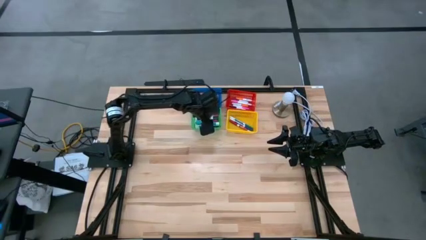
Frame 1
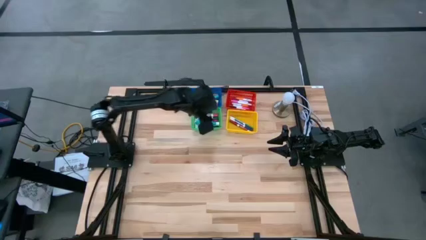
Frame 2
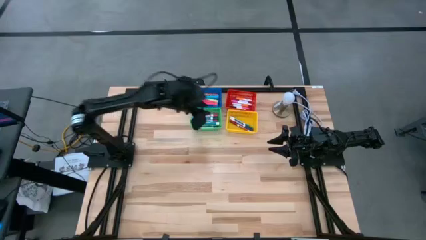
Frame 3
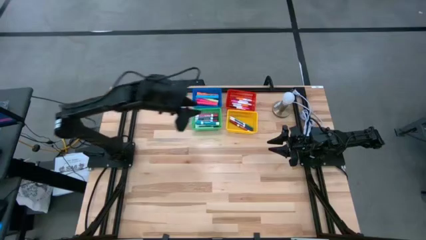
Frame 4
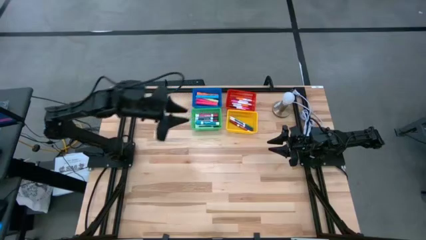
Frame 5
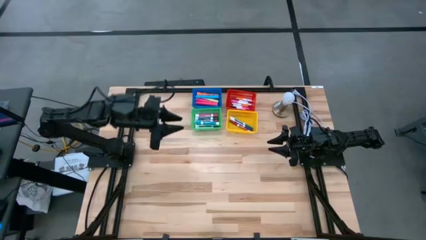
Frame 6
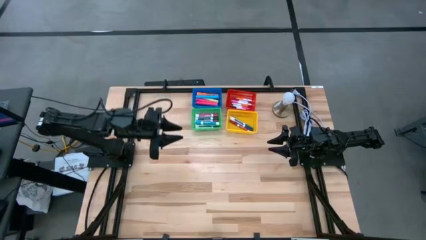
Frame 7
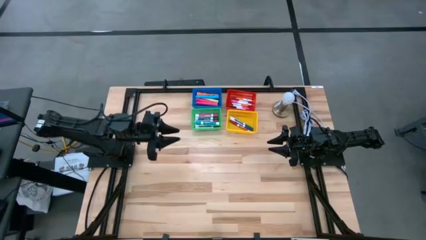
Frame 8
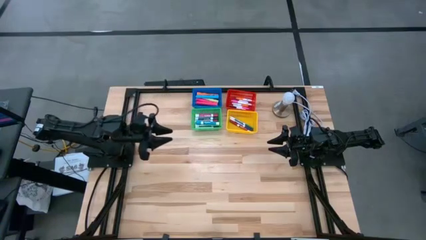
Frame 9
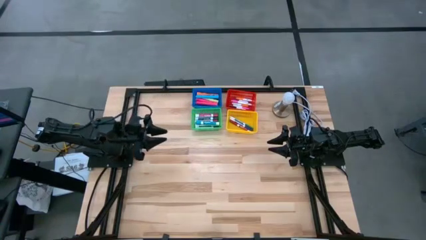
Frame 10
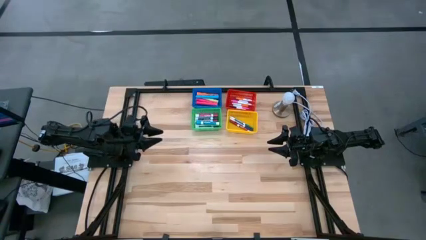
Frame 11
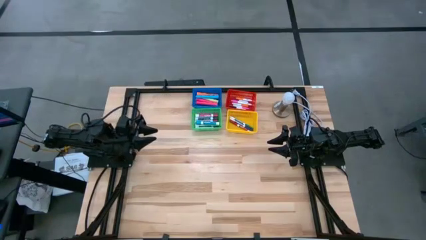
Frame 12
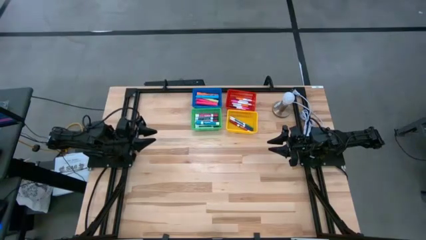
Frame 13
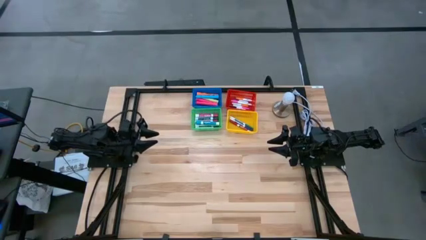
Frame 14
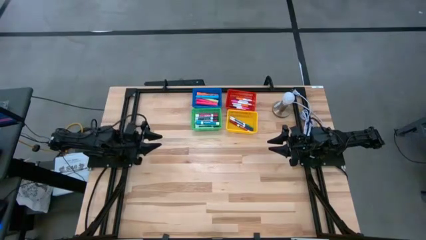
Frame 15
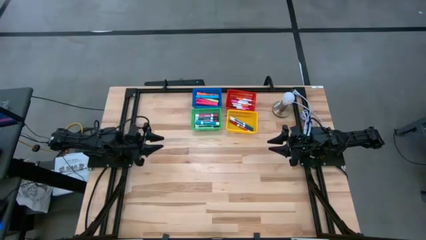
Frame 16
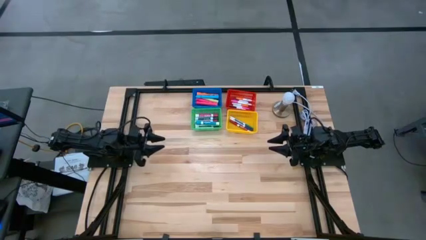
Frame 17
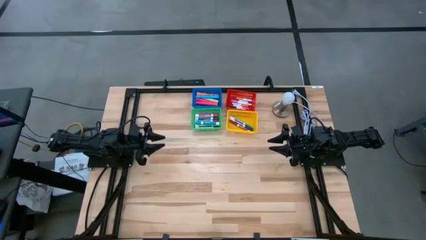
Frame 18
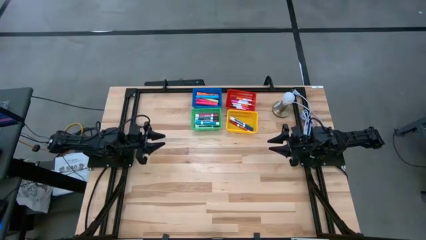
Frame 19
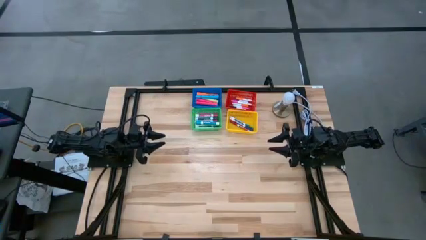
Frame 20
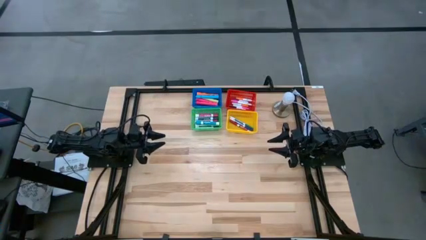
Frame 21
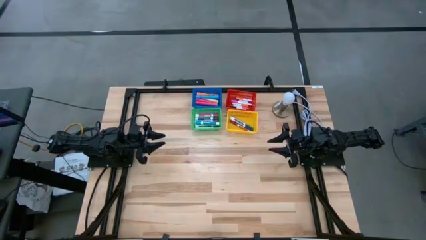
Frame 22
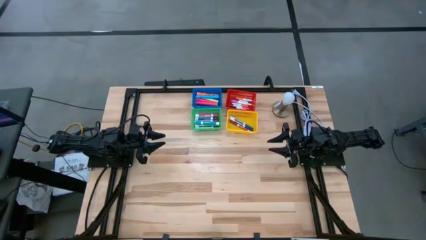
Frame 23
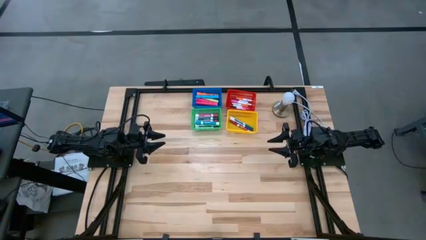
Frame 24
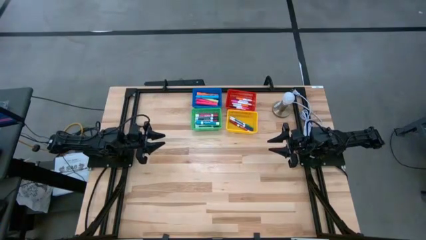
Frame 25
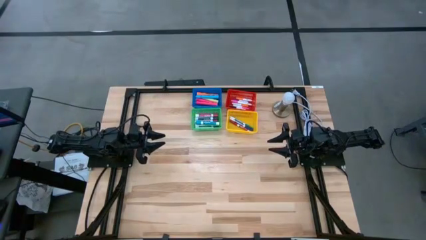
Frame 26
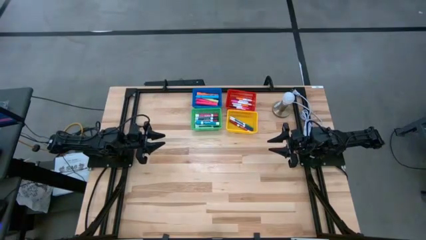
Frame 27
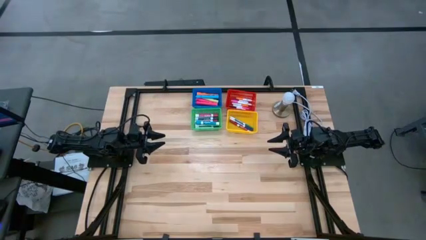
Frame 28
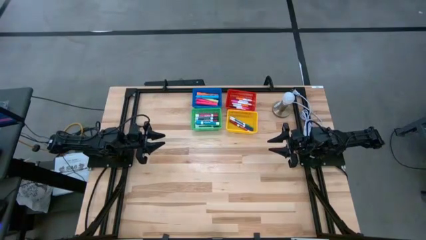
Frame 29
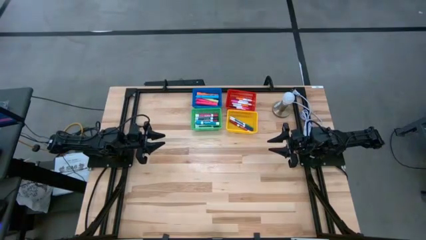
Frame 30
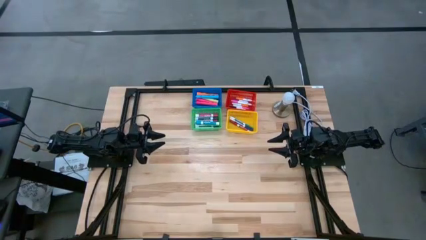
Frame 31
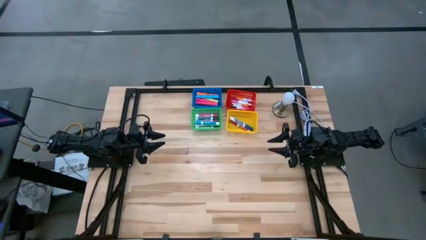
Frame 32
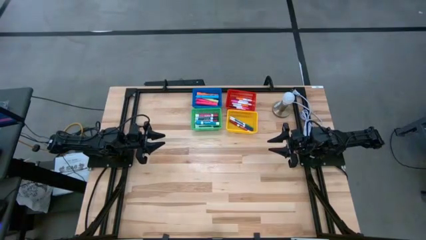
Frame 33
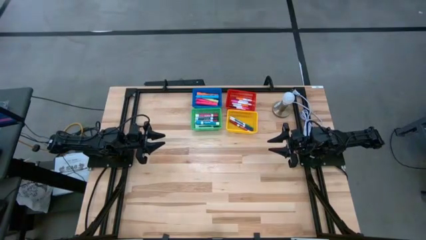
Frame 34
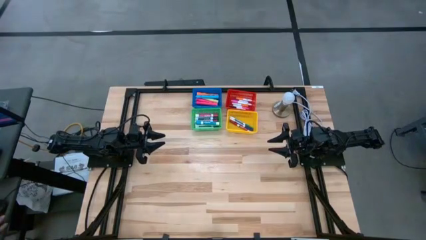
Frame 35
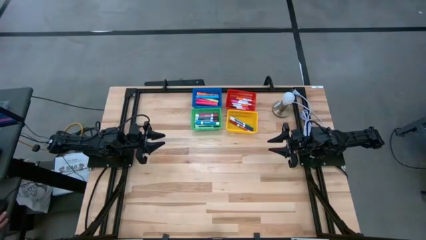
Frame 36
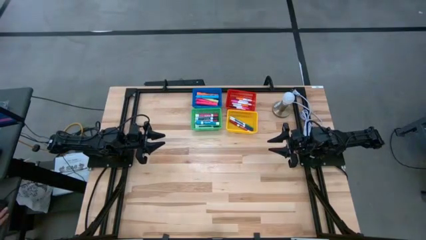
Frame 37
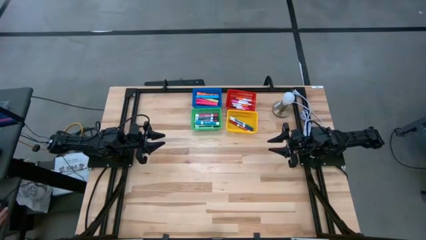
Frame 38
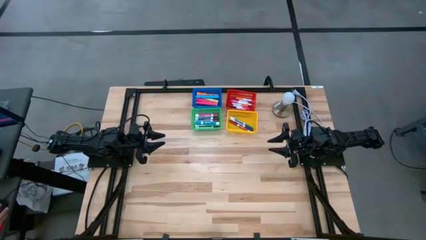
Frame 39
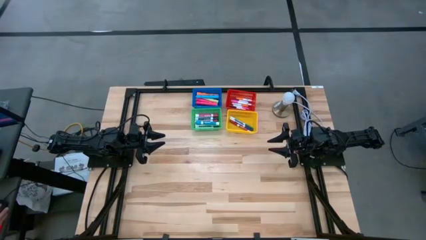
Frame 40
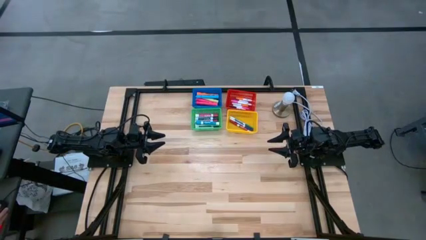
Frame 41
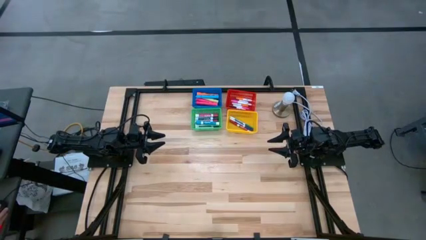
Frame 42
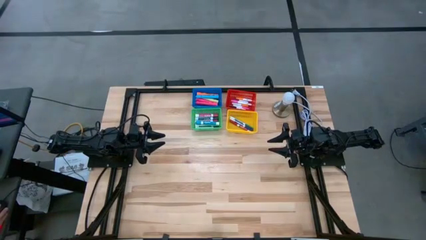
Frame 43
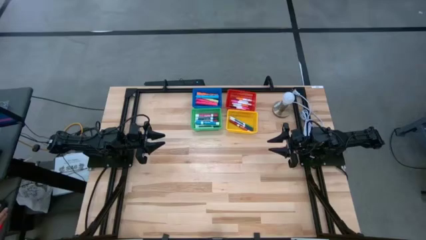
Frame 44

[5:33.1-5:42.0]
Task: Pick & Place Markers
Return to Home Position
